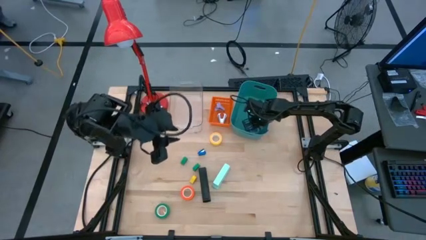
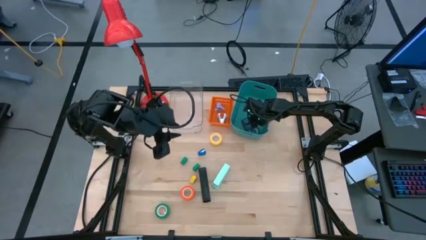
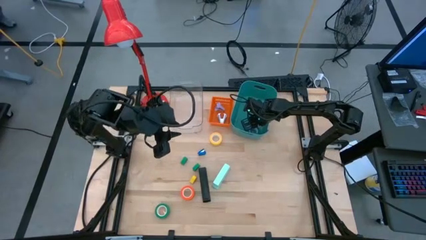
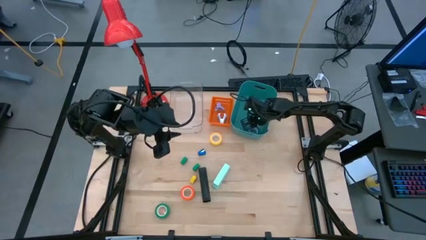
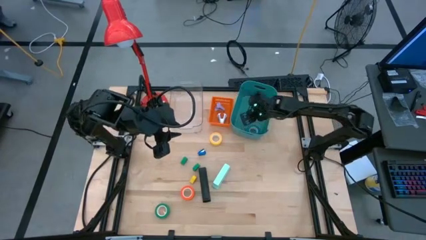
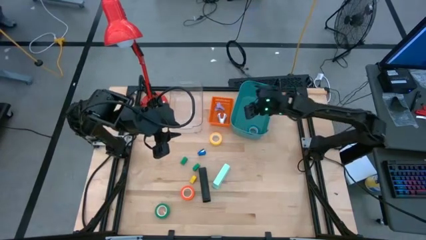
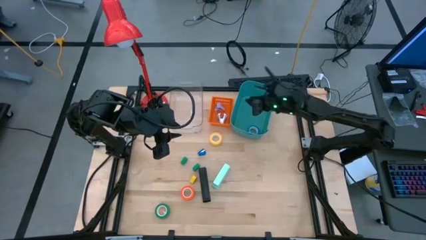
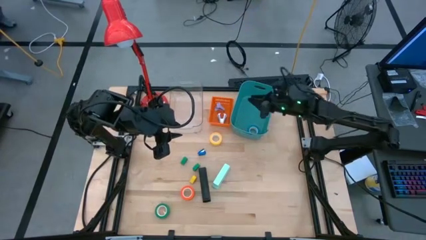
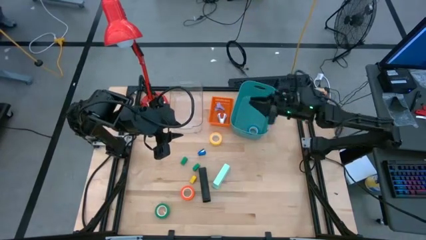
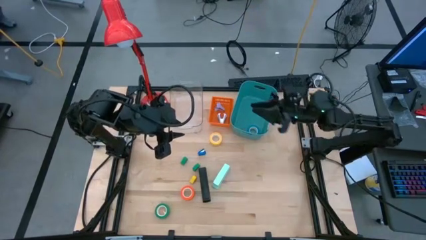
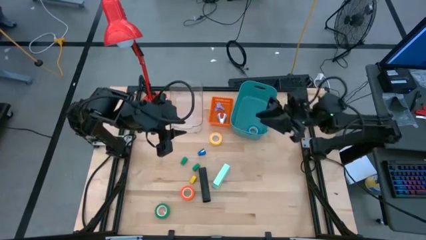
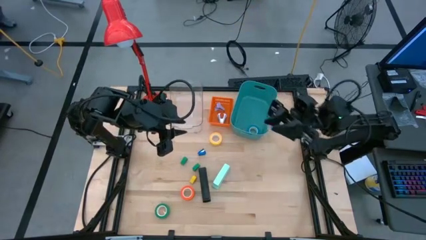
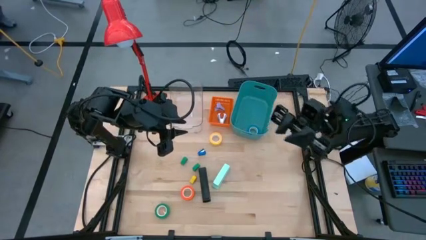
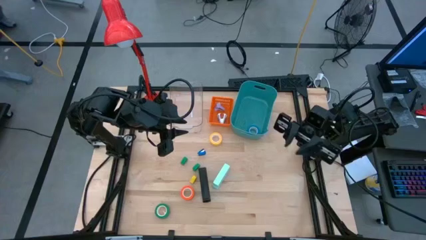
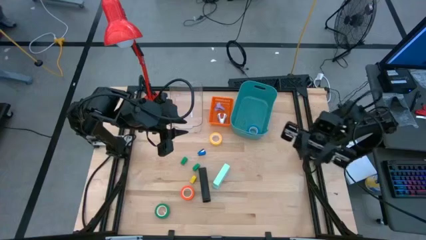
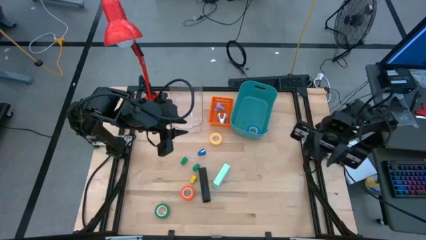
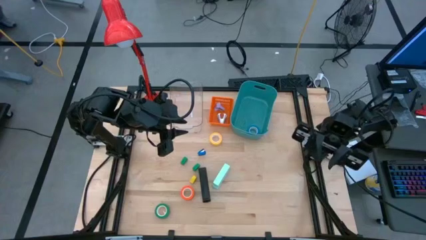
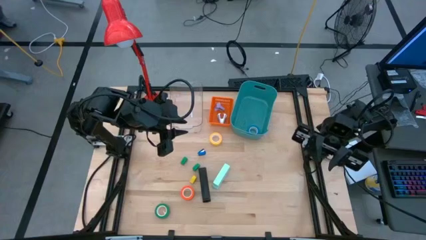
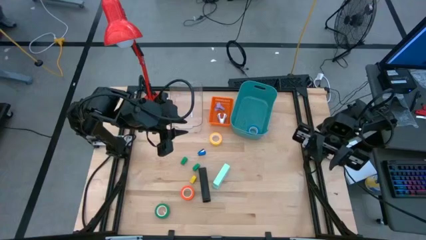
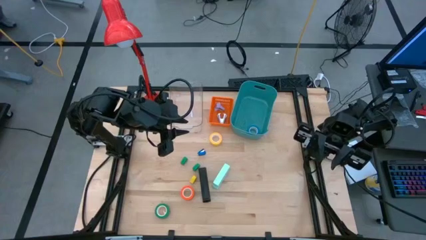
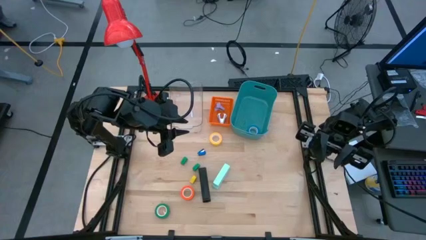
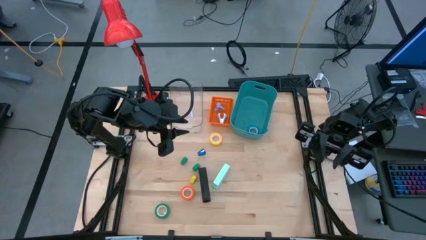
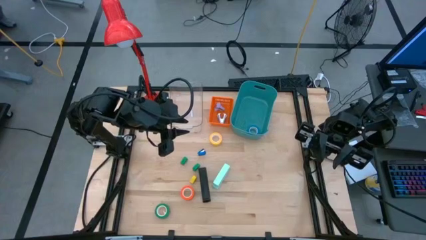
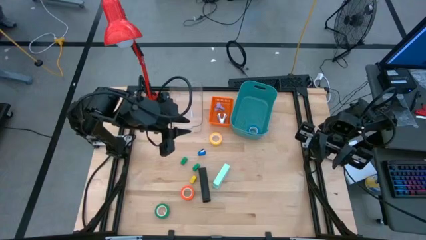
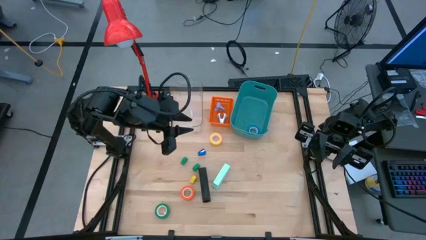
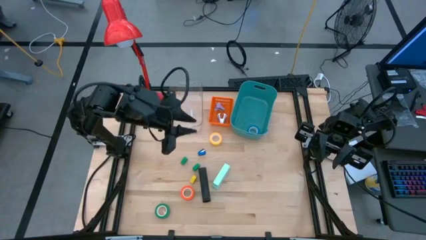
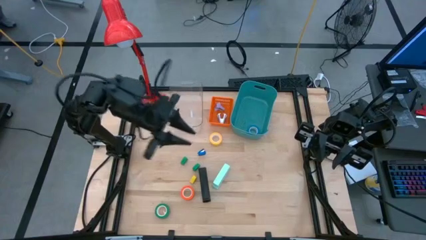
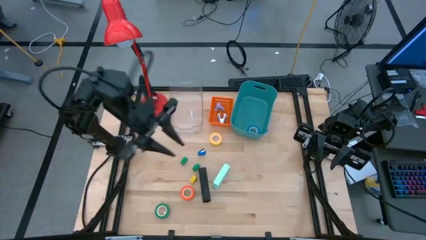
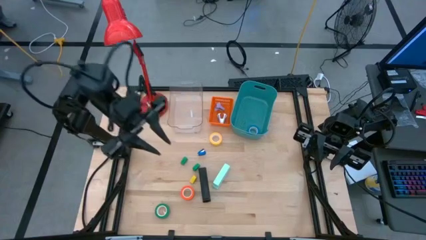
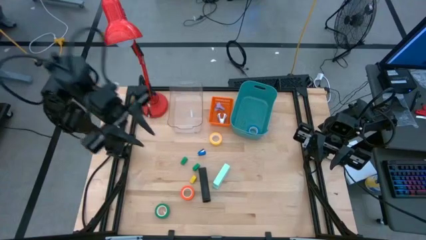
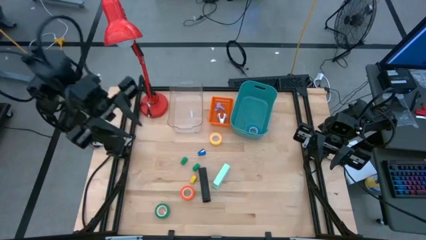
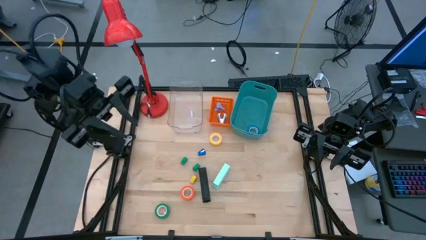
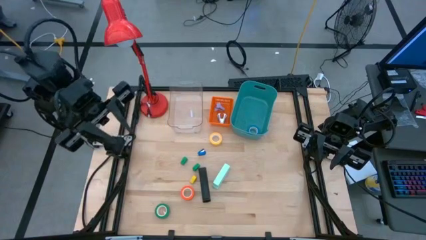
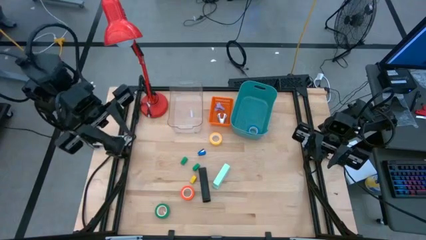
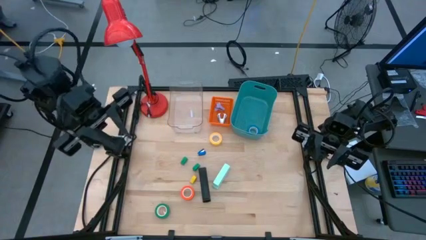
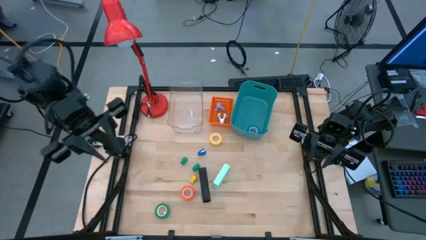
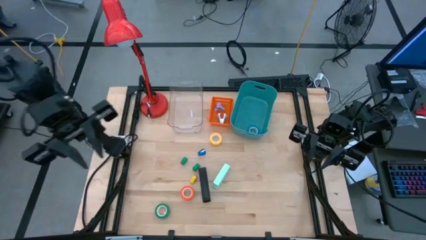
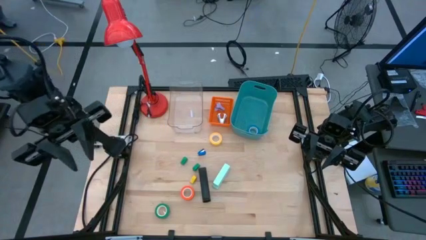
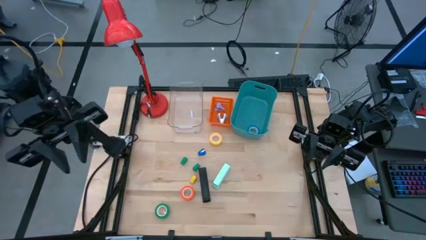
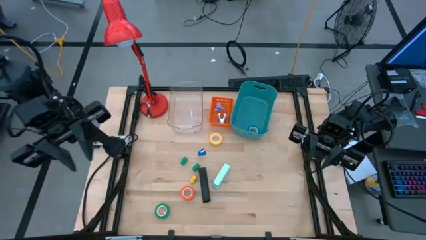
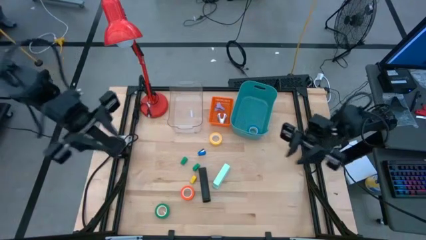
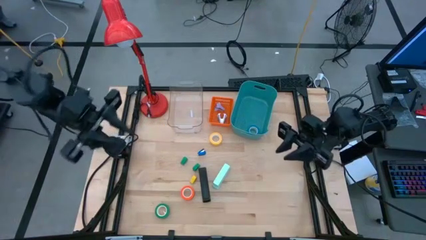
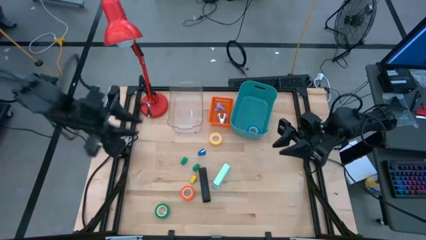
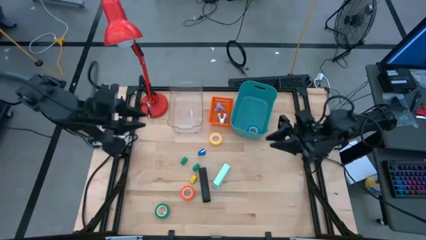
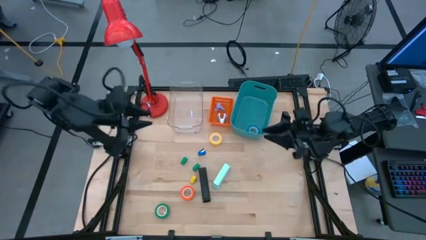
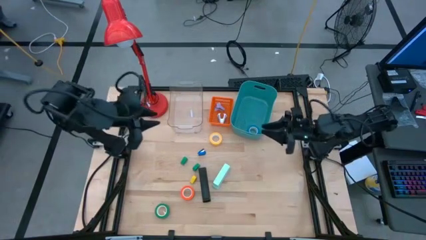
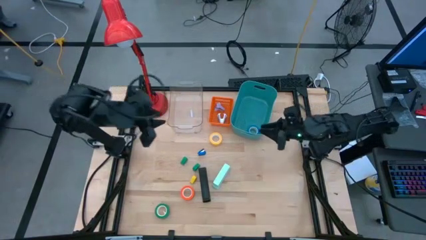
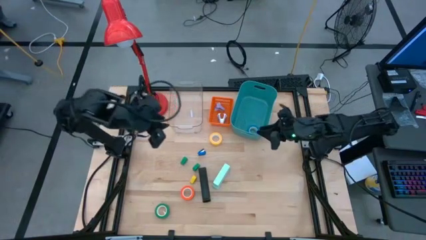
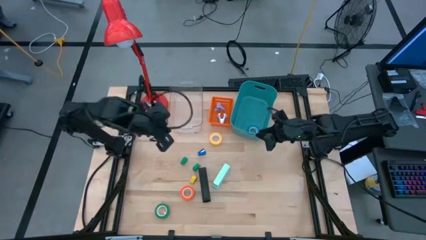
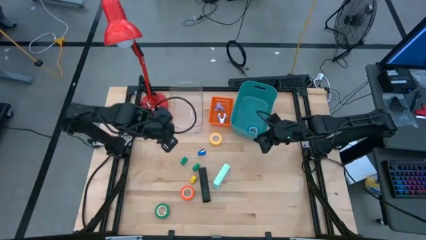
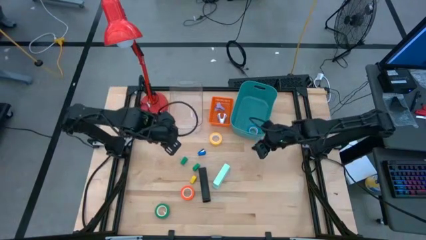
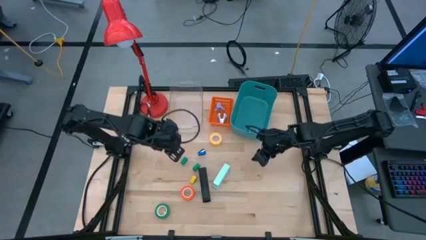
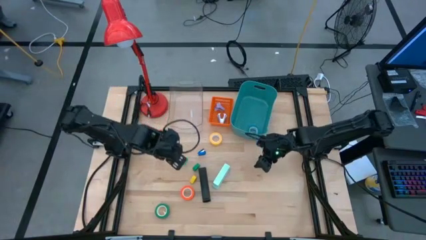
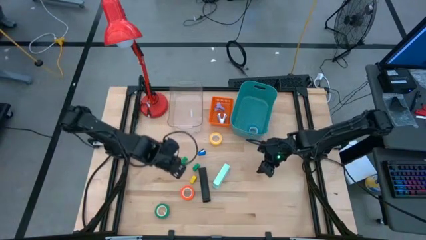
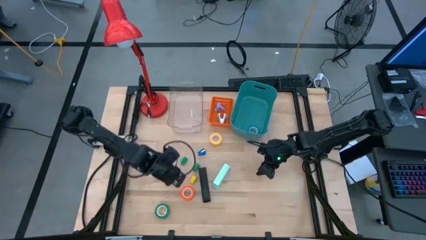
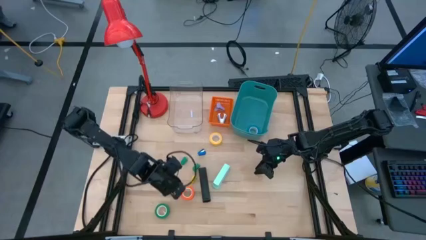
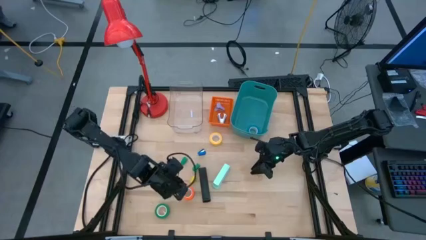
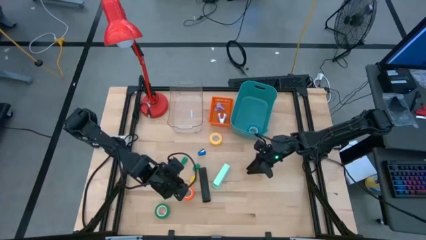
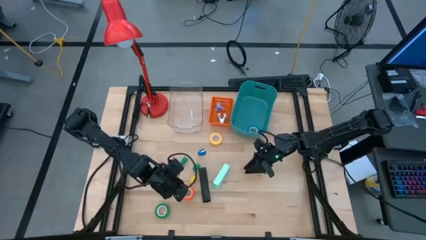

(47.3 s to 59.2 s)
Task: Pick and place Stapler, Stapler remover, tape
Put the green tape into the green bin
